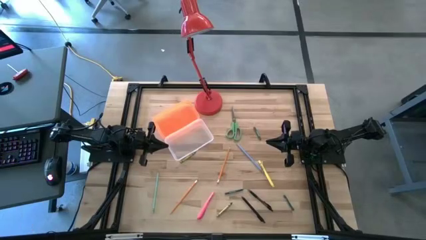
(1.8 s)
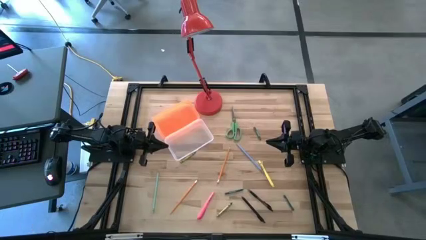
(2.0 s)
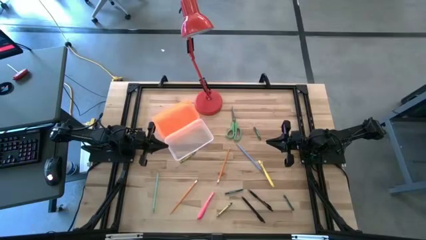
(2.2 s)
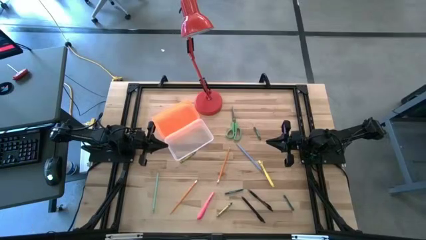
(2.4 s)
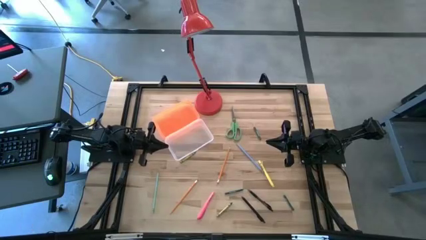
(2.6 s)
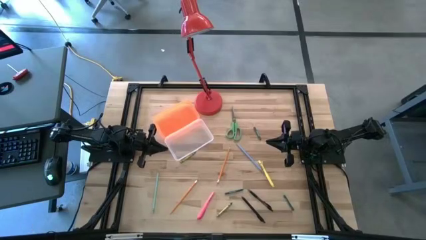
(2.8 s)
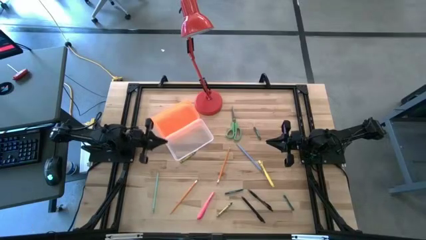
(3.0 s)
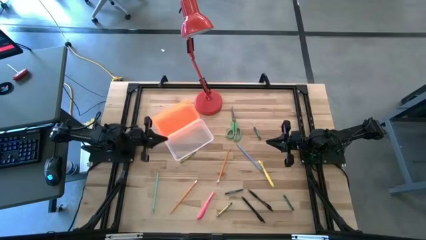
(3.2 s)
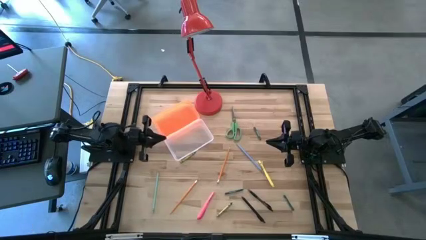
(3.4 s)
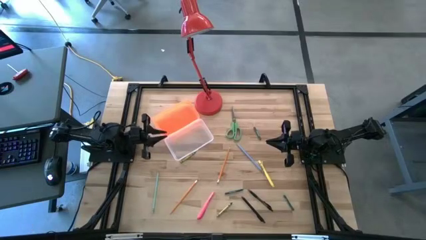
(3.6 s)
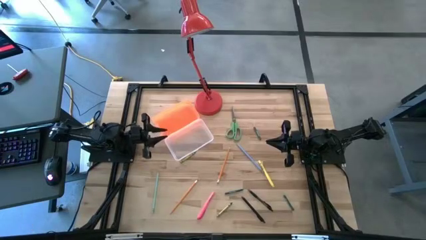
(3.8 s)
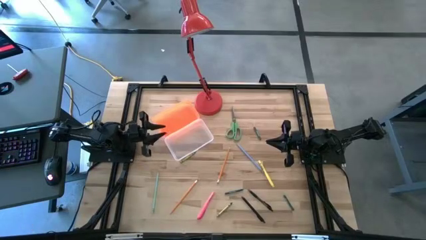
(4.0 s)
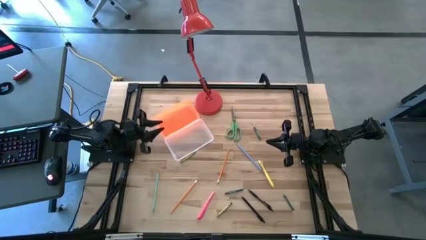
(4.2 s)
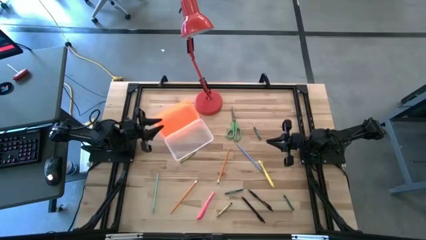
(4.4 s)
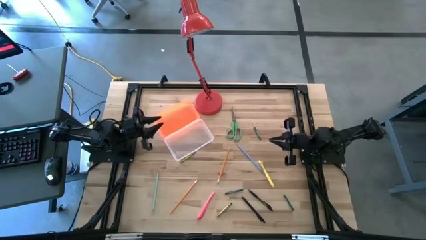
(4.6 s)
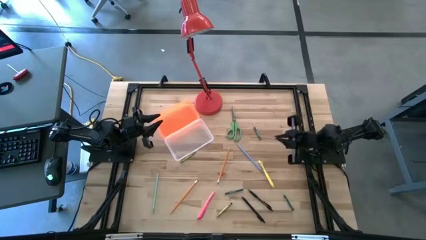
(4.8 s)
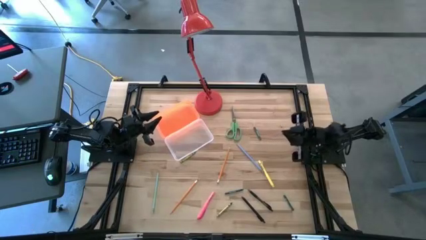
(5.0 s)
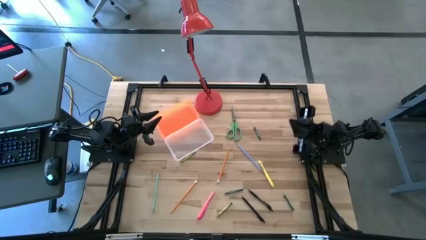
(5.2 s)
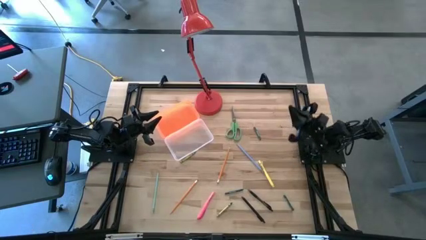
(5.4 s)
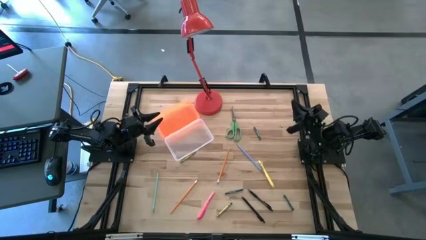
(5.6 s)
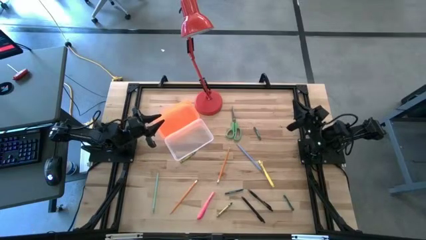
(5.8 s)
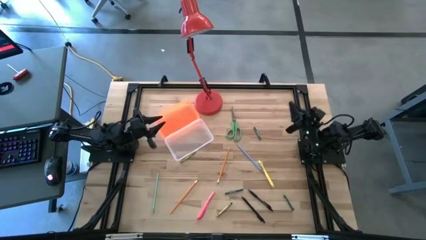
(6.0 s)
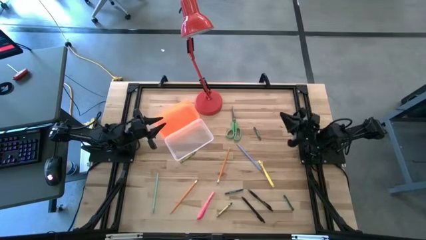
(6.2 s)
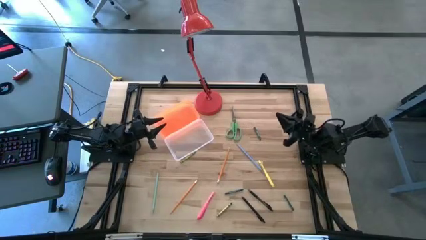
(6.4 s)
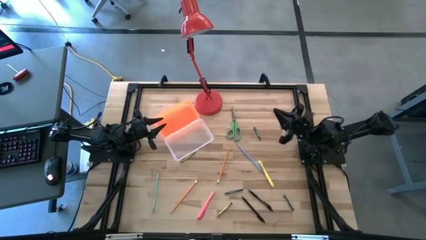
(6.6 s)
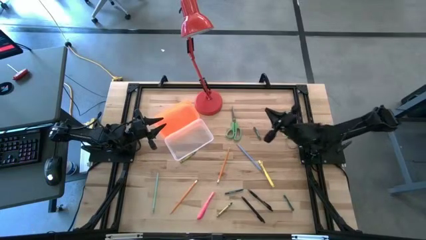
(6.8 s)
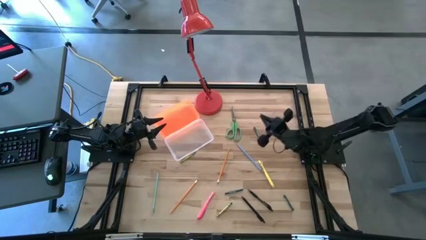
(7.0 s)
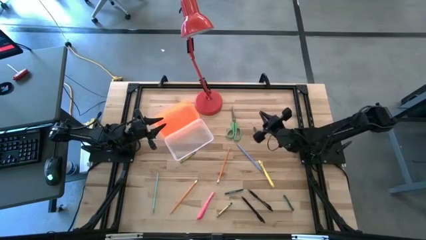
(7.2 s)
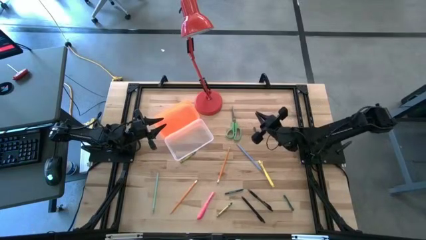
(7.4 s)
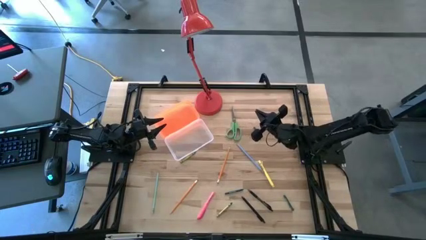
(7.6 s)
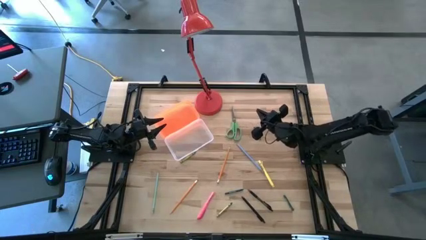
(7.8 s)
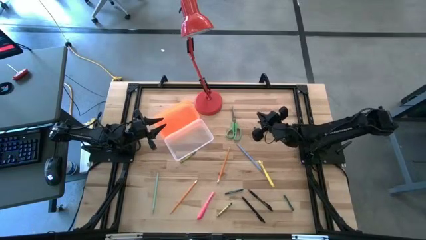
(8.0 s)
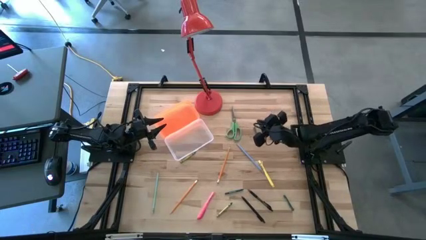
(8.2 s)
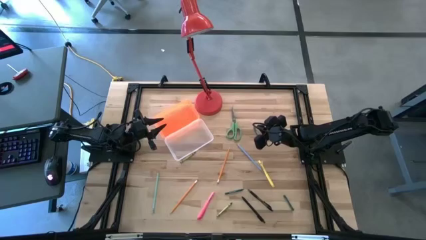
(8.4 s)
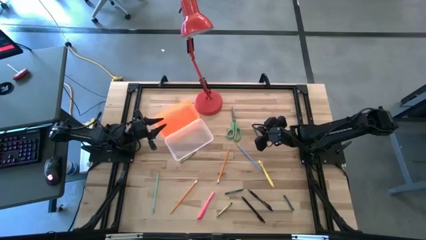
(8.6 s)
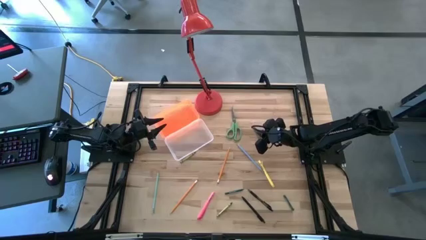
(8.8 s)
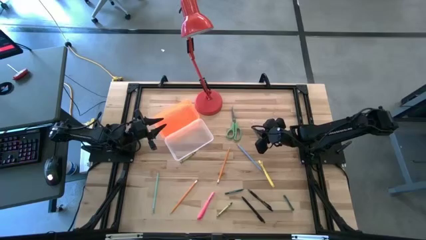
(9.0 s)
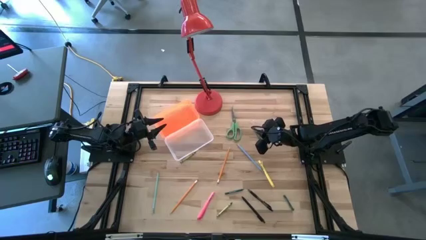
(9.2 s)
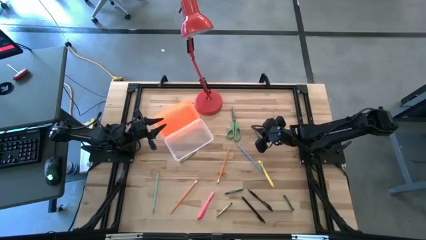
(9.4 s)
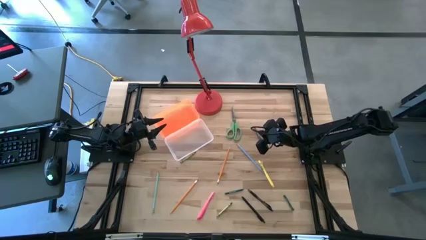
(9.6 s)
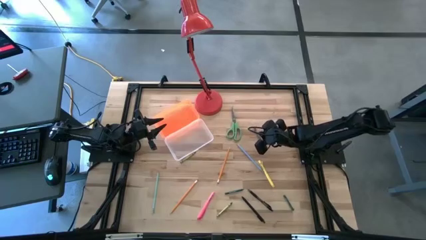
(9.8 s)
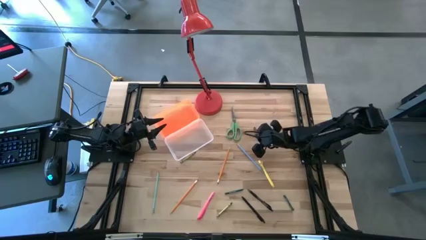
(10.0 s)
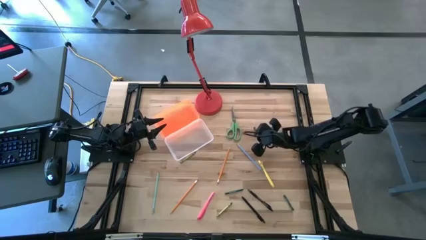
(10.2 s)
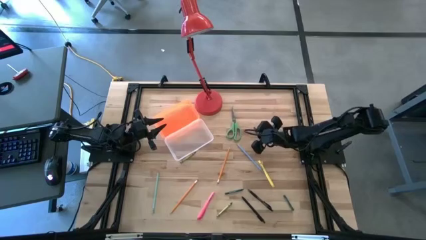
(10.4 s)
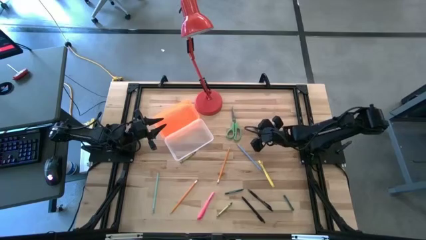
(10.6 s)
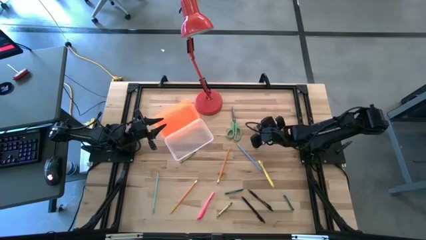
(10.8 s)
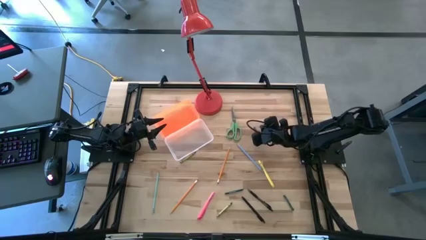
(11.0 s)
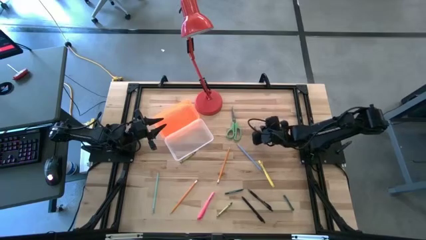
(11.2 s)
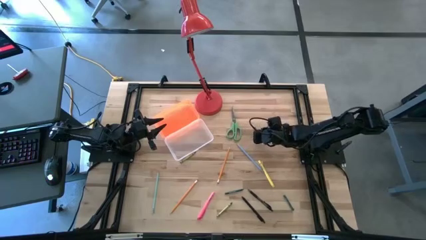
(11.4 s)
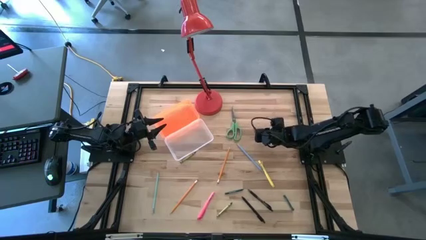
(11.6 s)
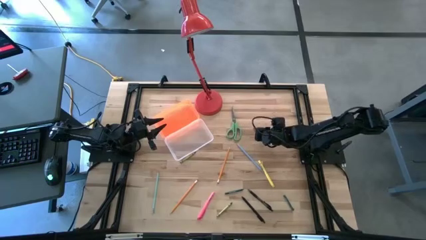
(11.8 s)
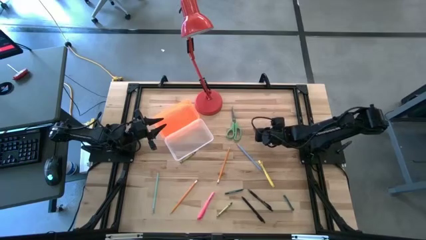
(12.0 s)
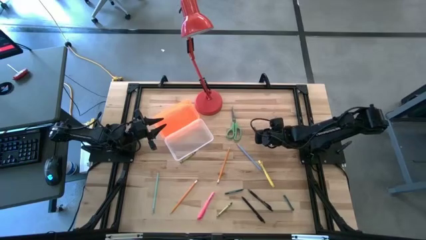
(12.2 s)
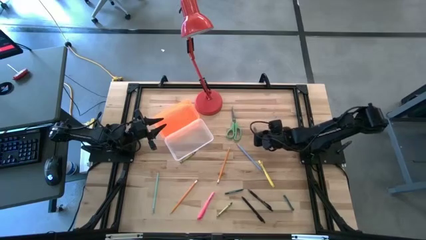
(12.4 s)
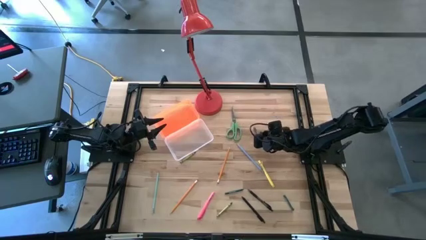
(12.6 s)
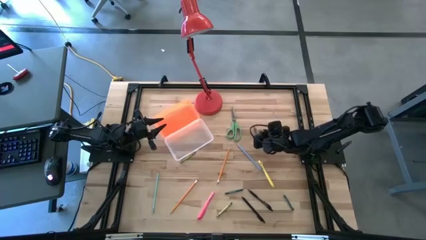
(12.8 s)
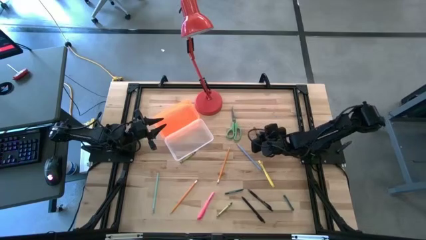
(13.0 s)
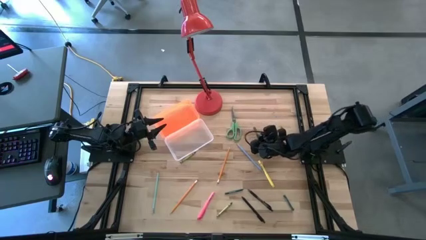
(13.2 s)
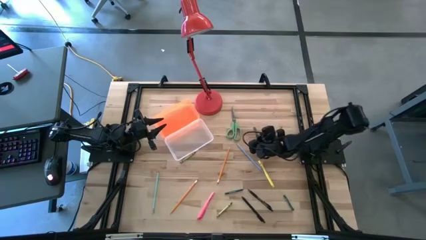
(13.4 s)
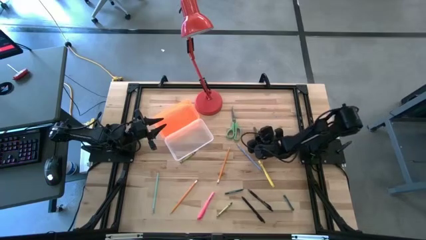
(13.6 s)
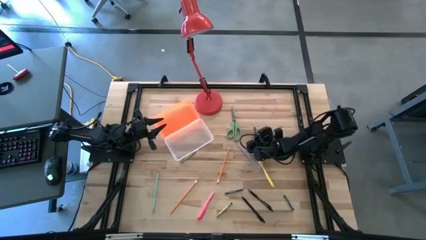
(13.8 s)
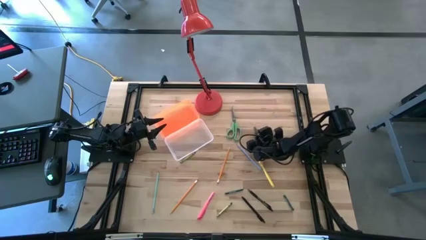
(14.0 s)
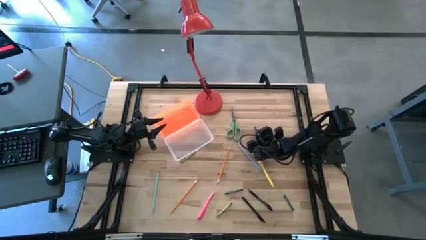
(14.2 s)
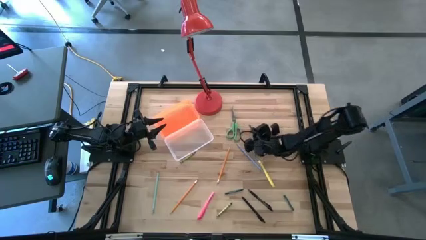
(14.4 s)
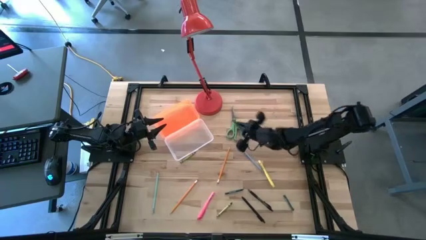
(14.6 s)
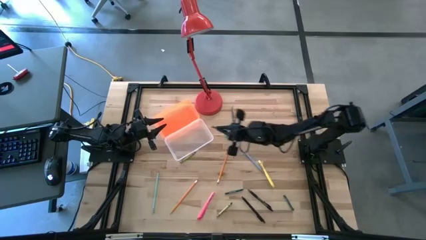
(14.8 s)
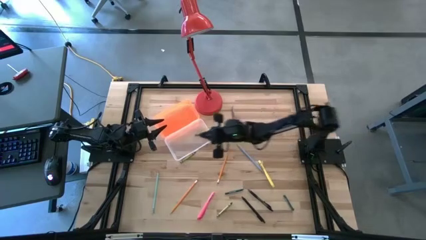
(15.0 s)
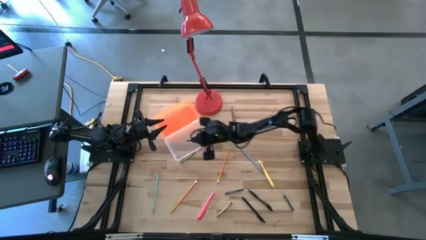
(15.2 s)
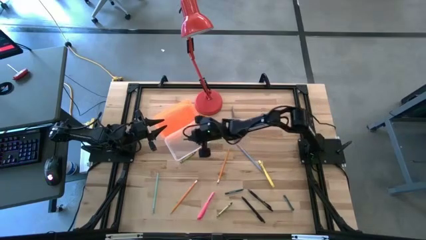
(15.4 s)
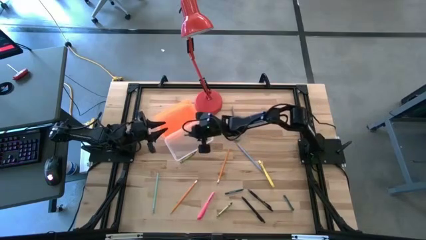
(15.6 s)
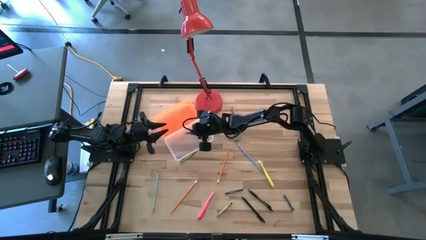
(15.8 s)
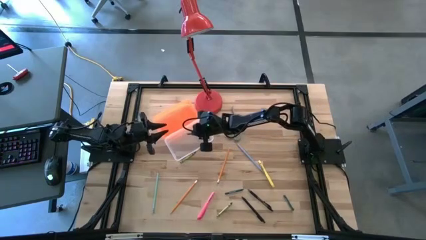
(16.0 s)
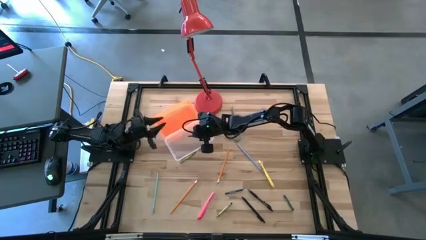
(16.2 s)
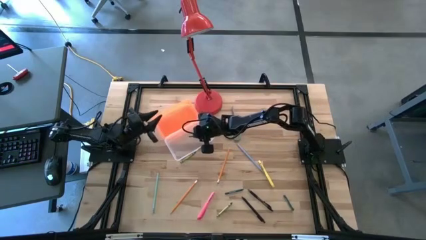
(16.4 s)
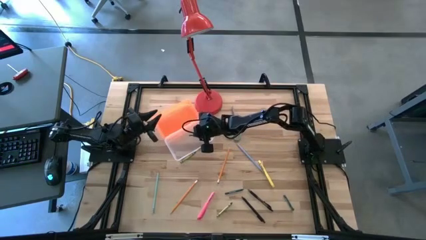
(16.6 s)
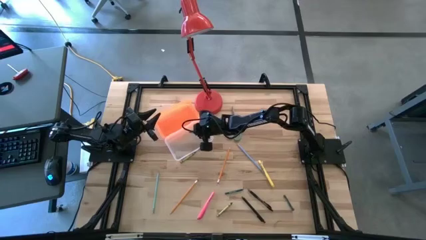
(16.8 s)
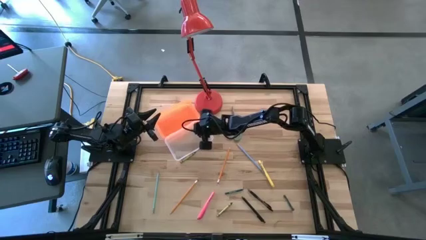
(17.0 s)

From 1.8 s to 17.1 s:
Task: Pick & place school supplies into a supply box
Put the top green crayon into the orange supply box
